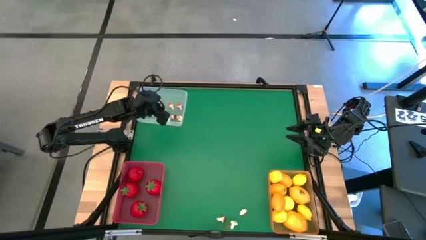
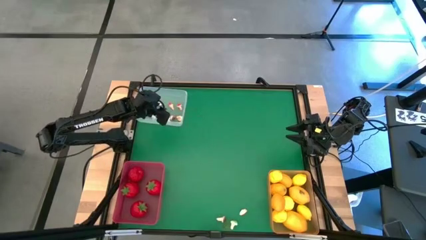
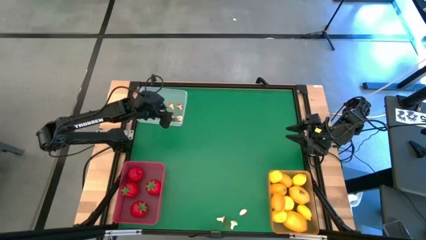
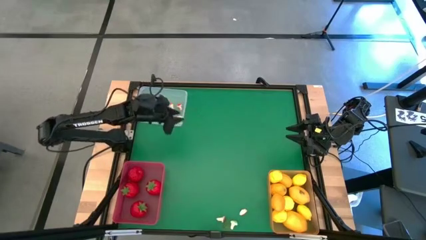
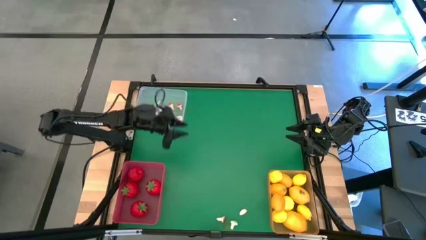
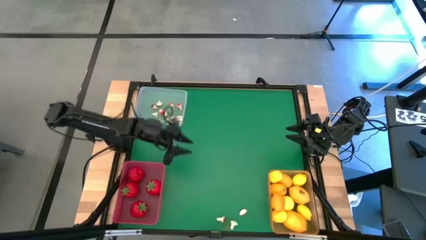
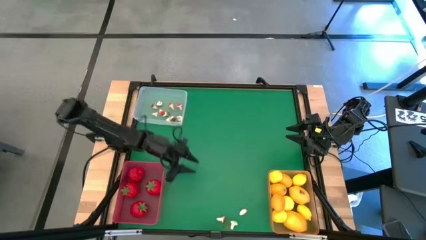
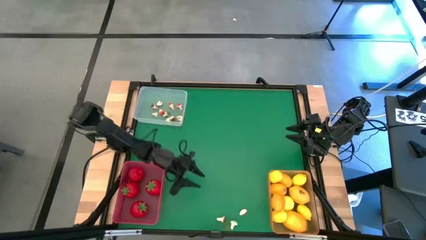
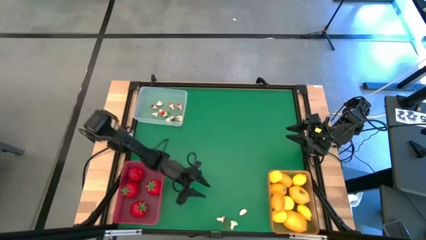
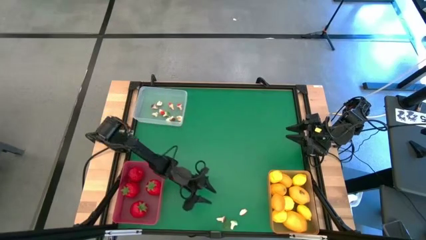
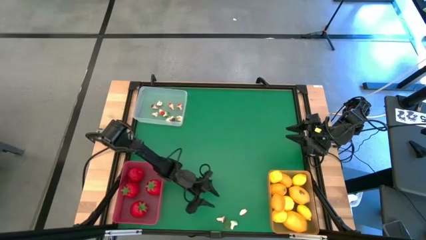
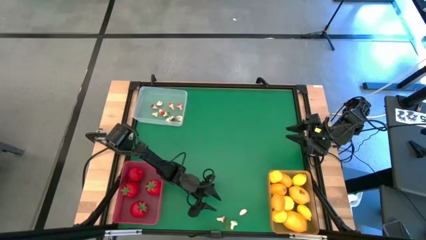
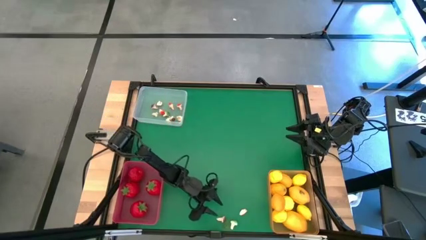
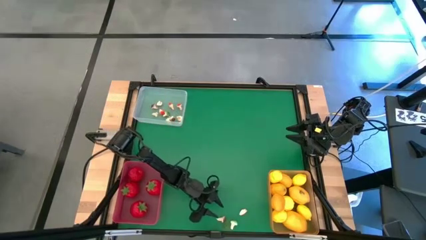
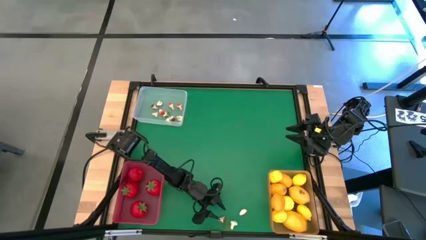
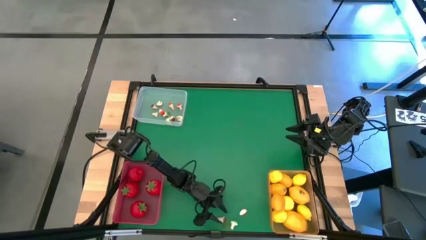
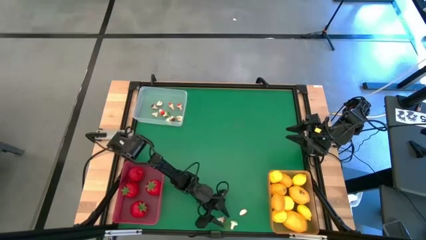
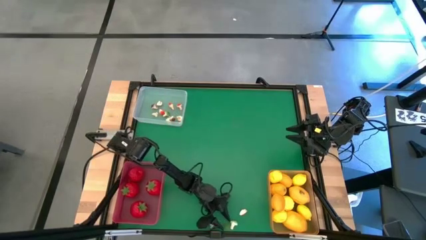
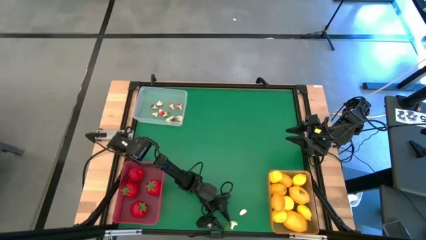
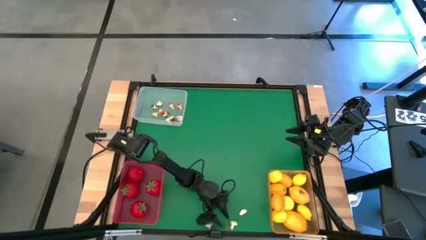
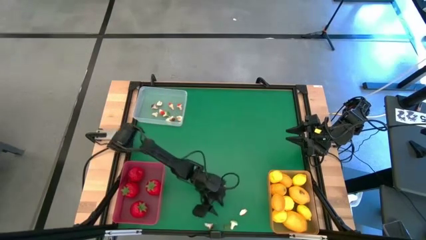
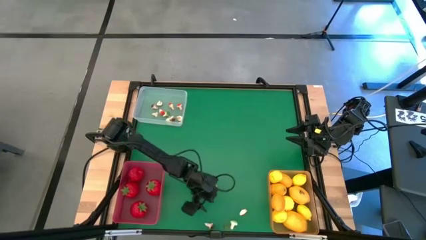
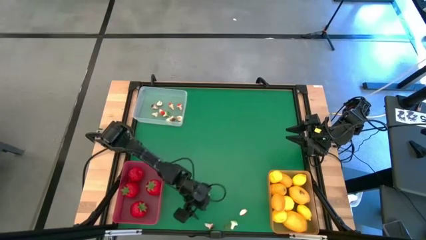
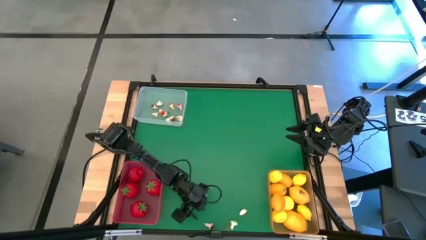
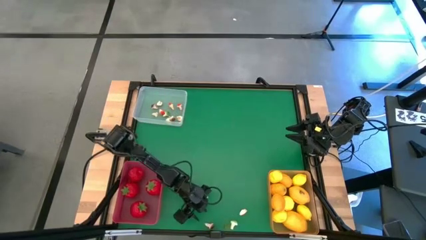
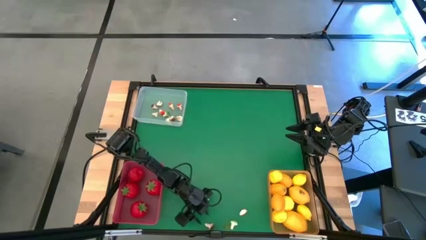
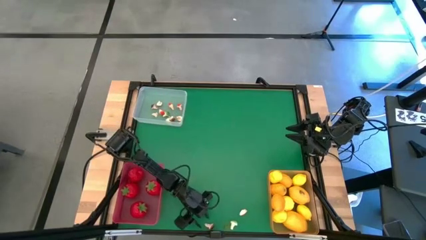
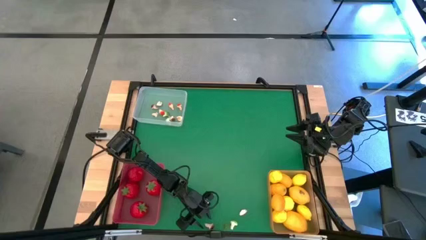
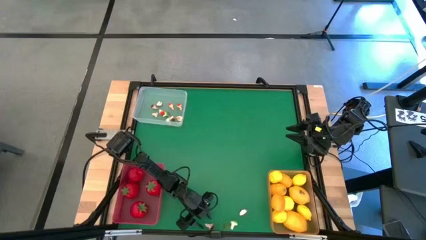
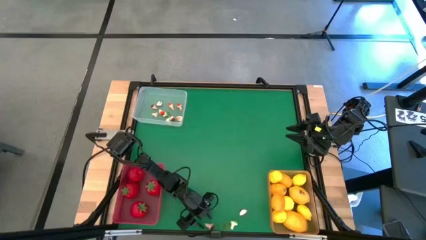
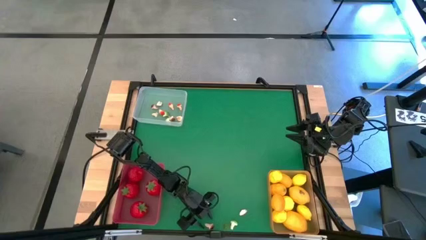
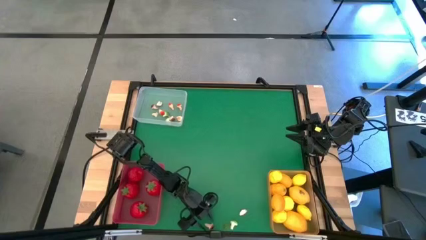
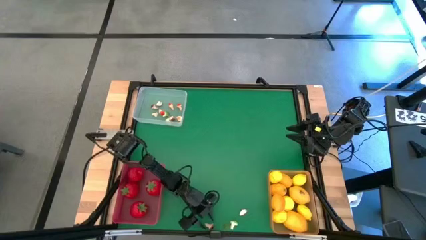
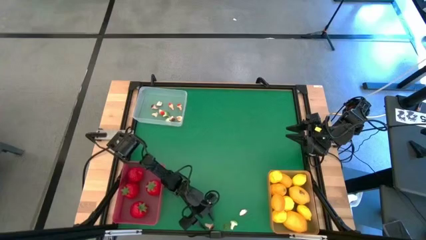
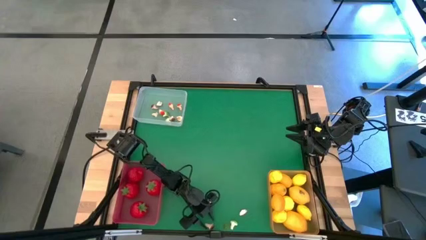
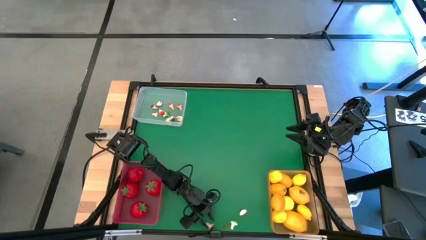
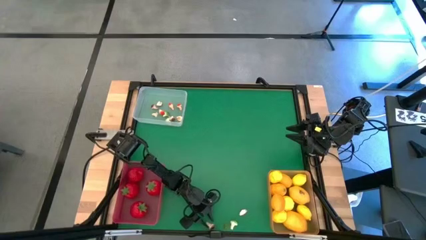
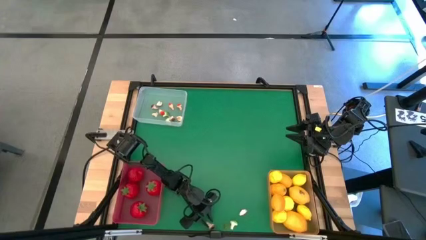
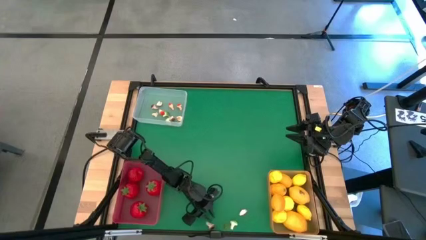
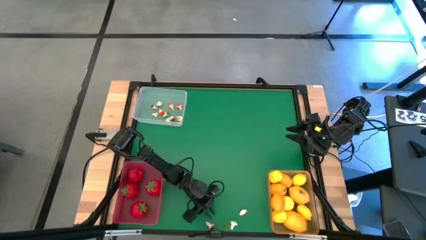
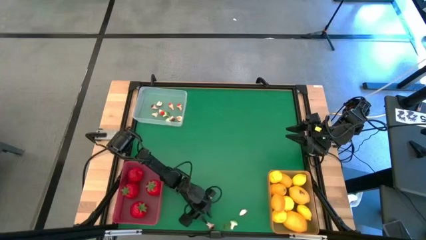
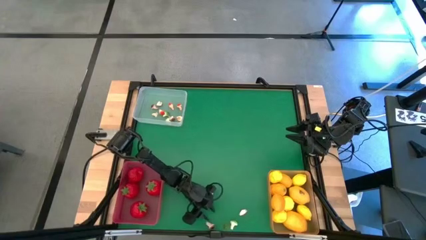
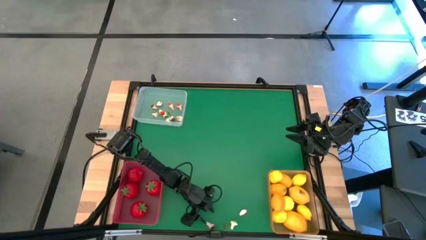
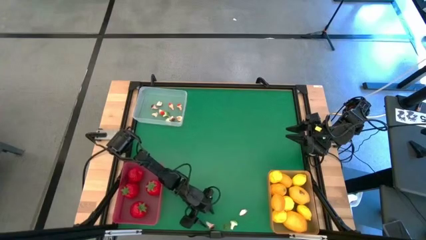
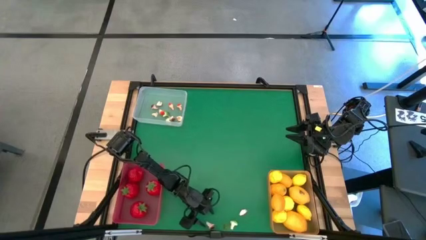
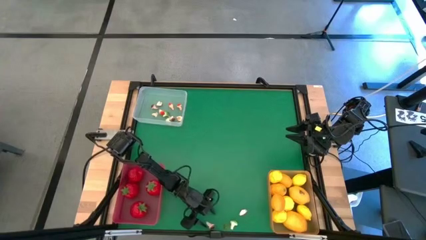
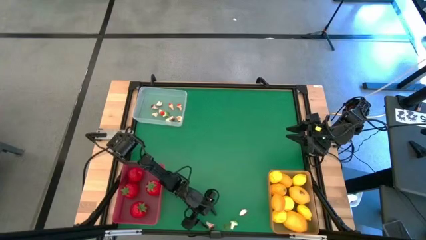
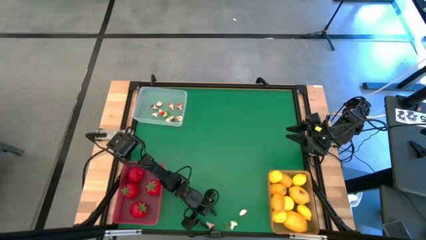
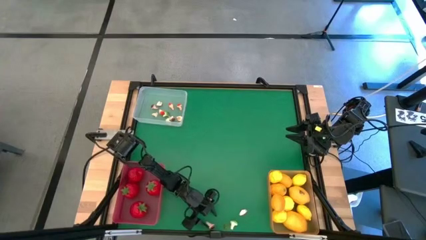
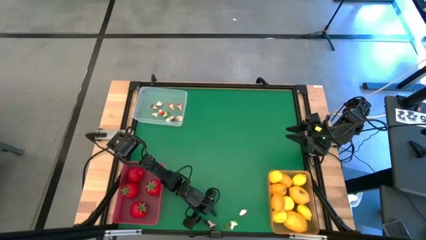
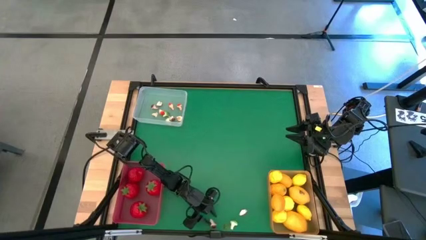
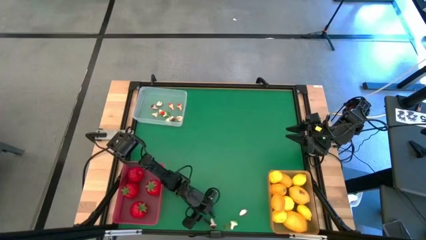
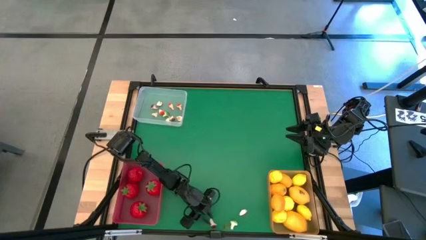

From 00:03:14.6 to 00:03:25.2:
Task: Sort produce into baskets
Put the brown mushroom into the white bin

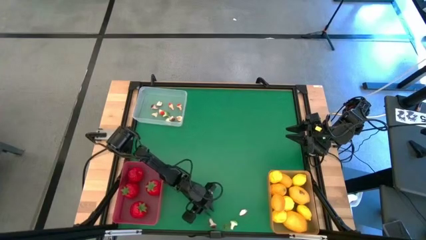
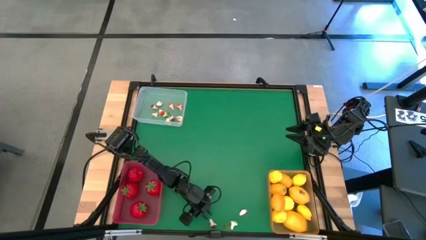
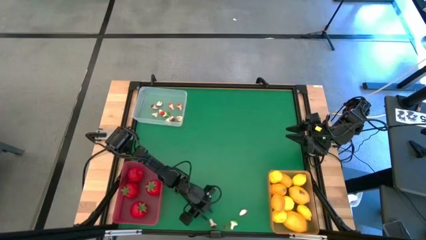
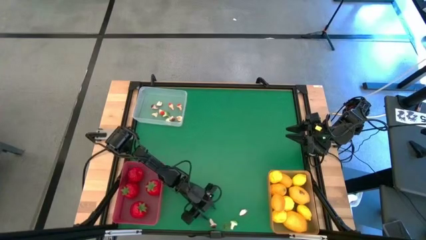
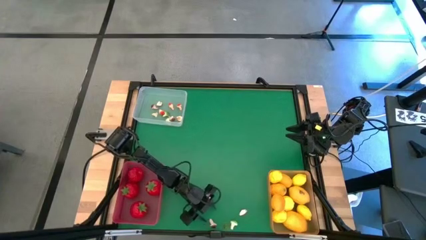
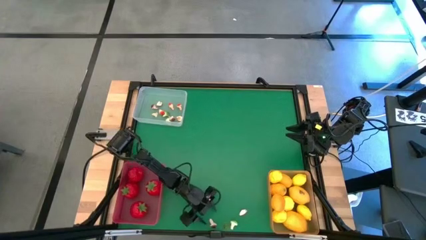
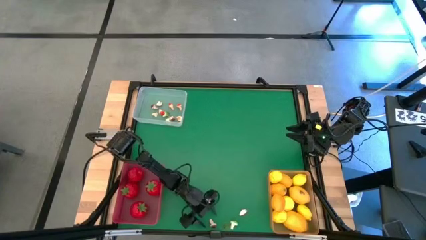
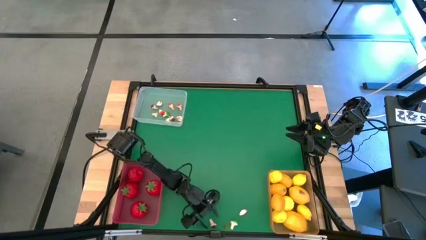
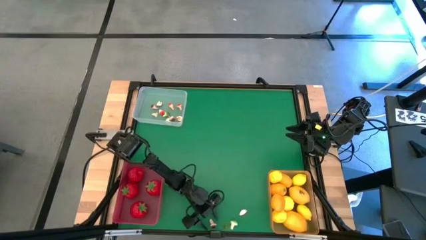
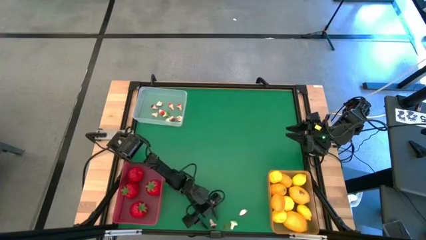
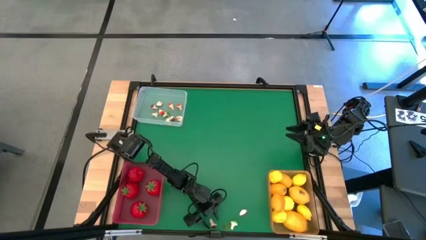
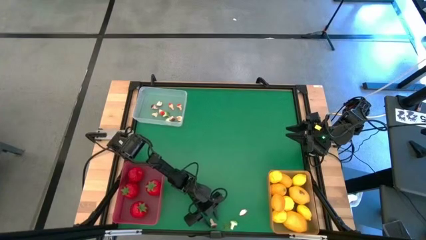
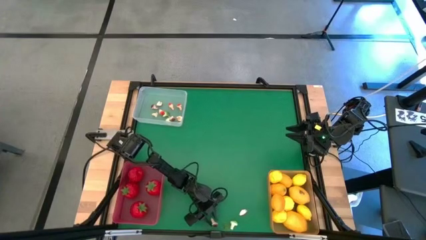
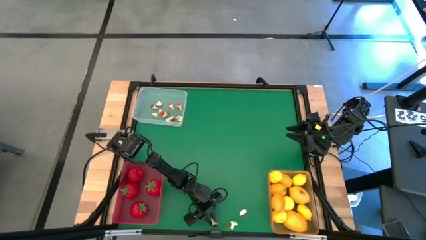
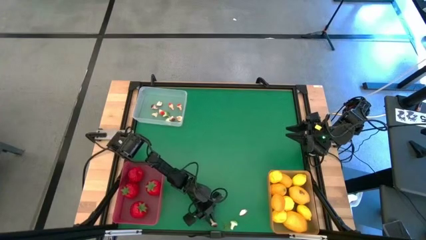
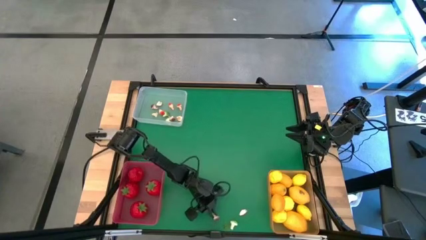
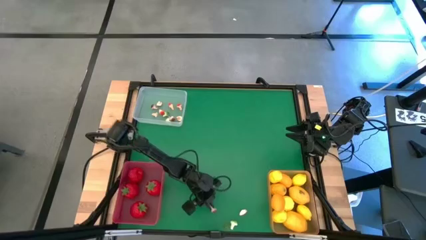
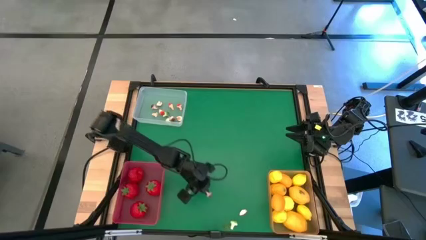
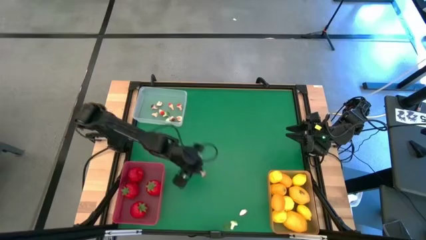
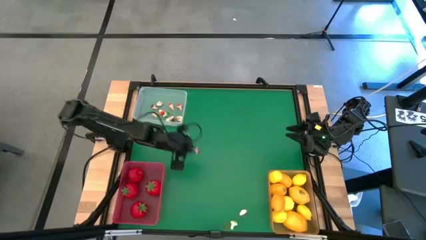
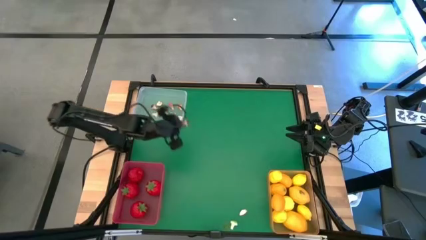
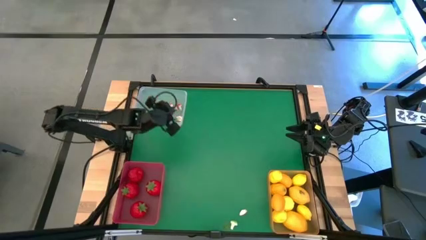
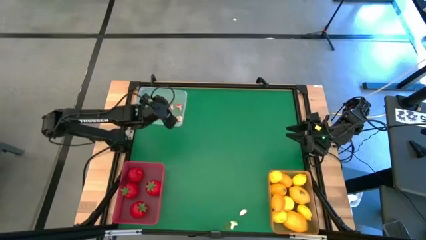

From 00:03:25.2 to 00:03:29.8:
Put the brown mushroom into the white bin
